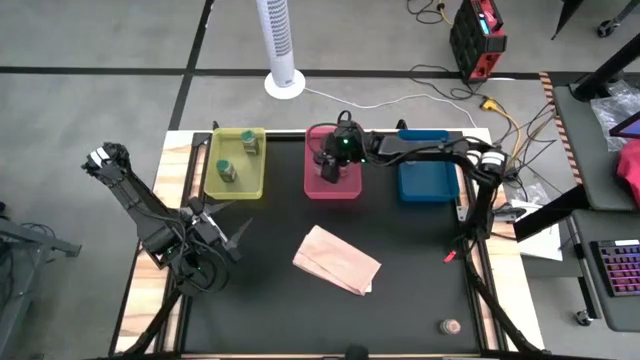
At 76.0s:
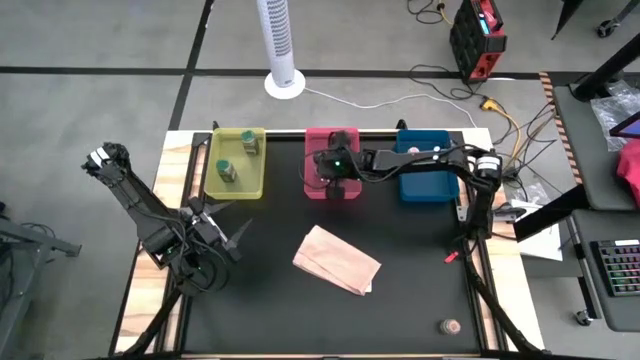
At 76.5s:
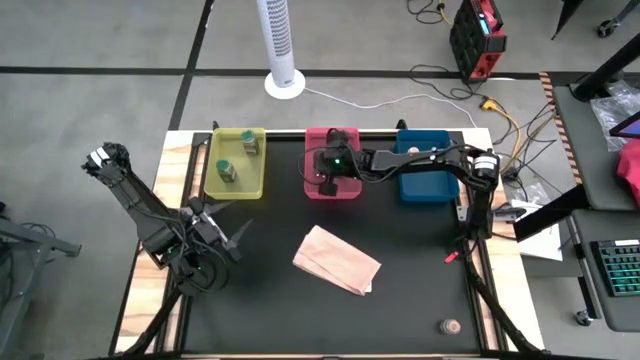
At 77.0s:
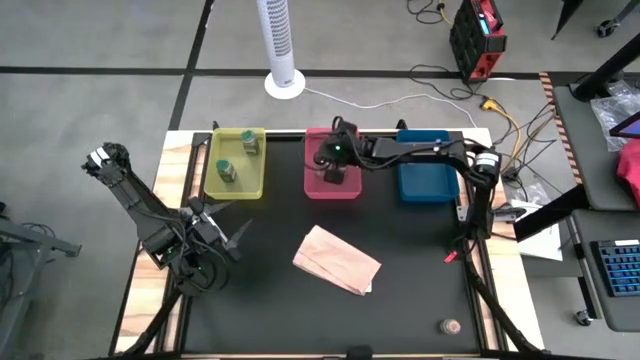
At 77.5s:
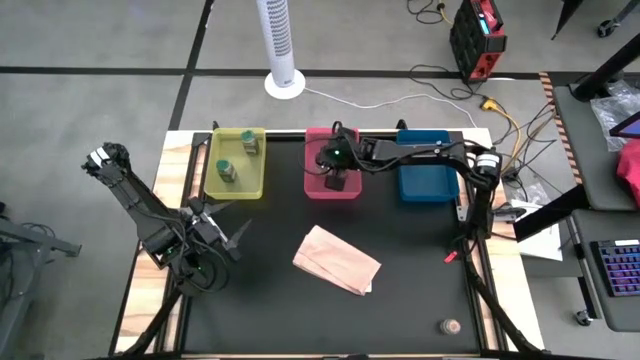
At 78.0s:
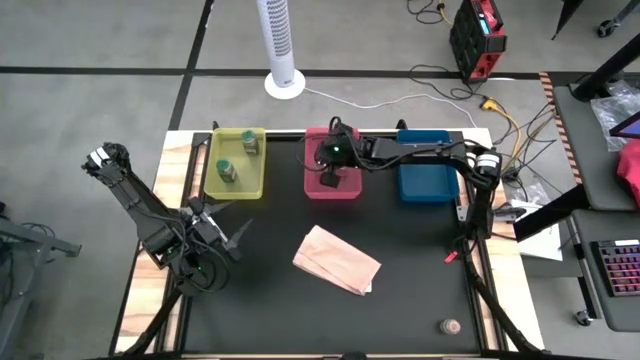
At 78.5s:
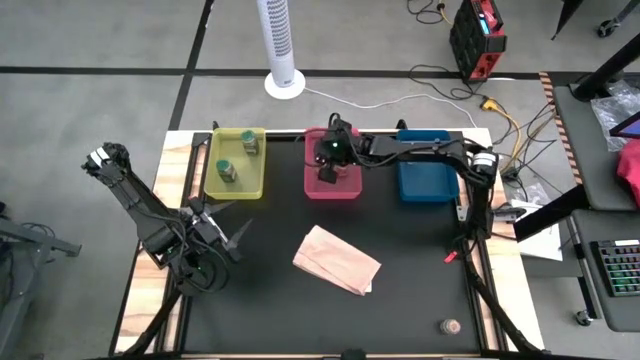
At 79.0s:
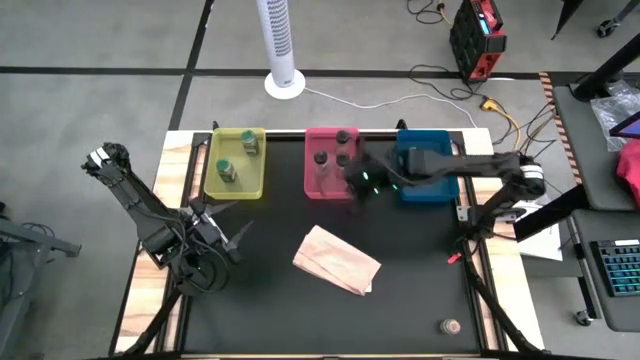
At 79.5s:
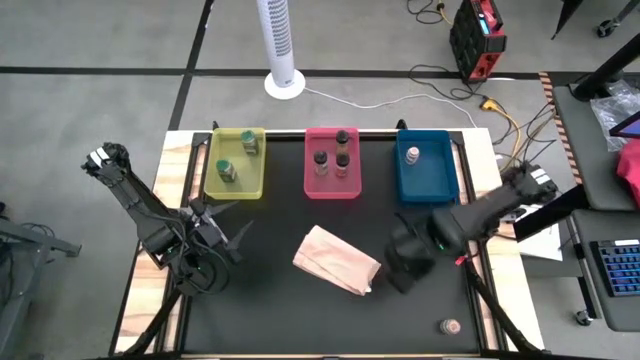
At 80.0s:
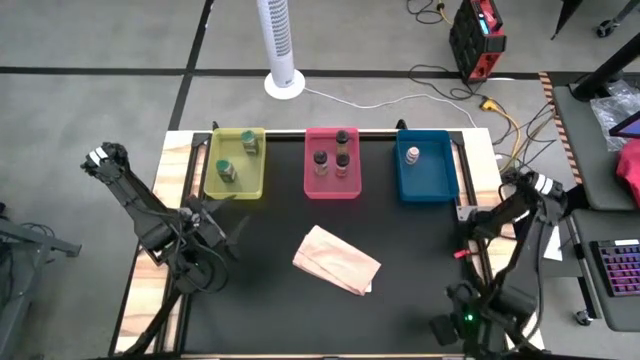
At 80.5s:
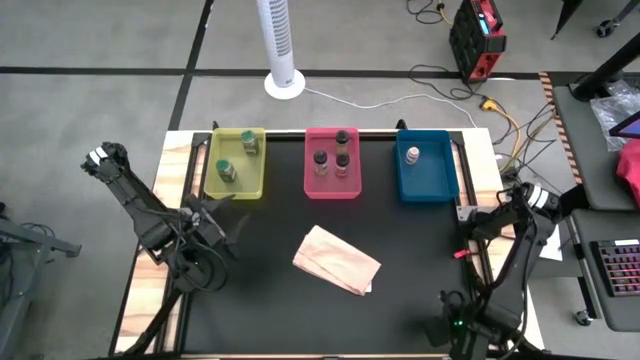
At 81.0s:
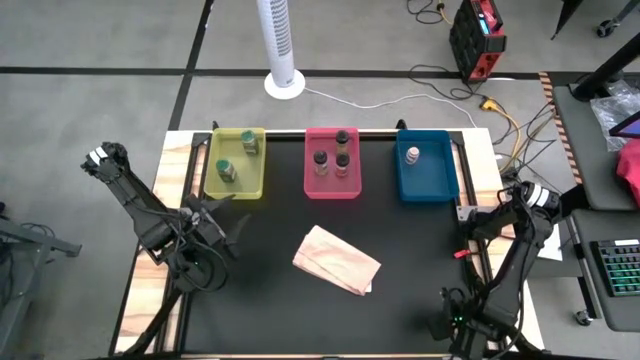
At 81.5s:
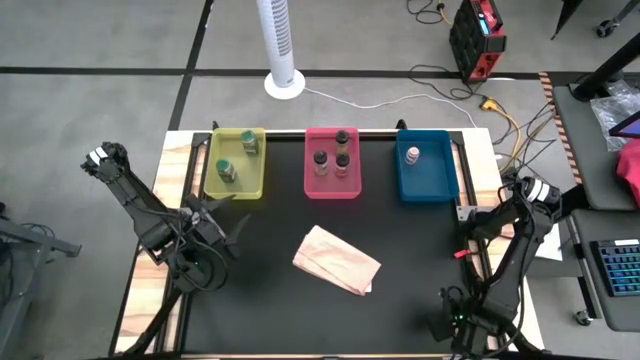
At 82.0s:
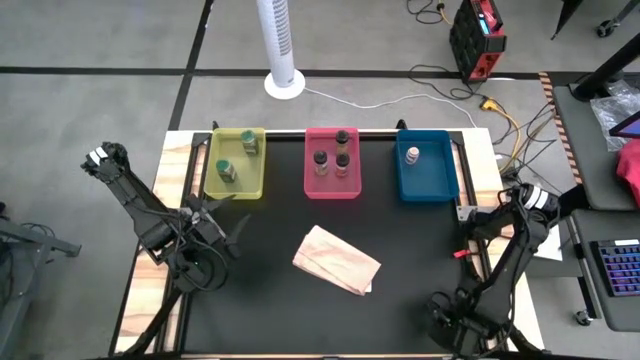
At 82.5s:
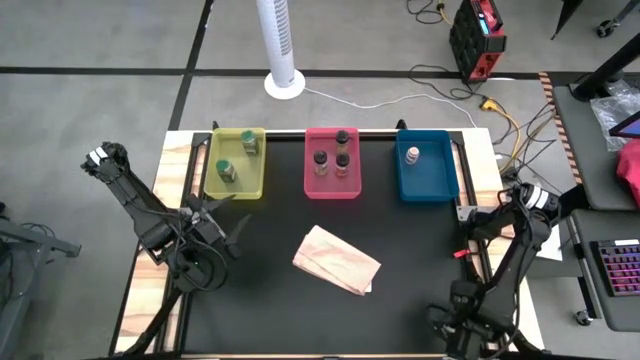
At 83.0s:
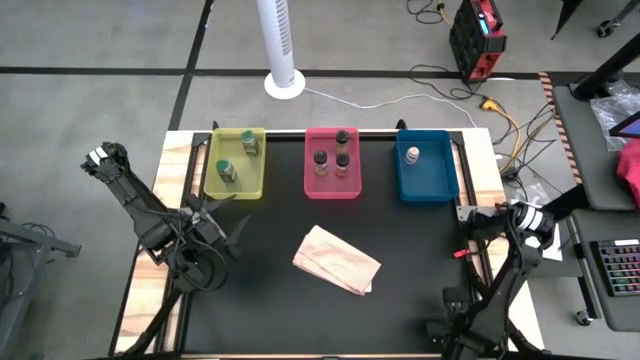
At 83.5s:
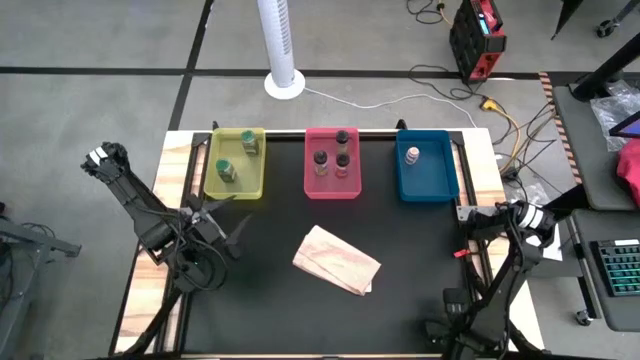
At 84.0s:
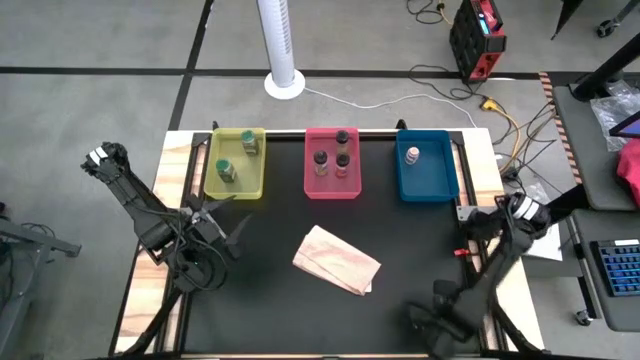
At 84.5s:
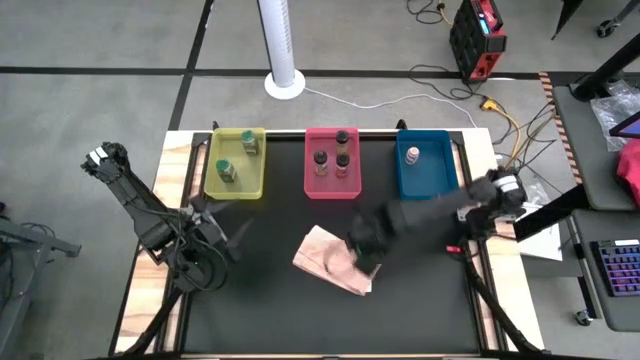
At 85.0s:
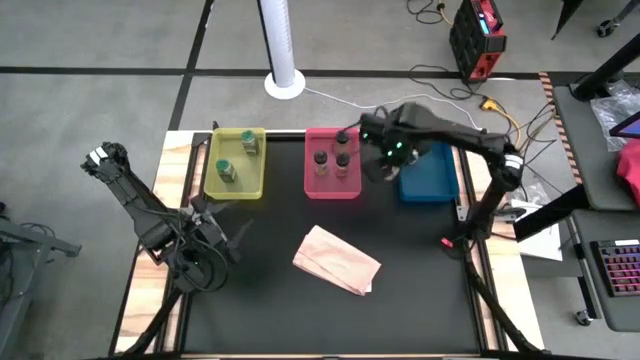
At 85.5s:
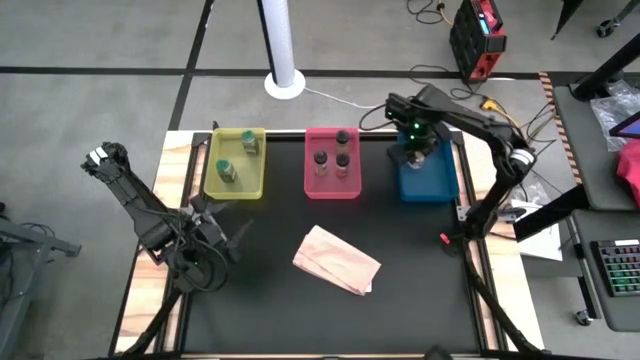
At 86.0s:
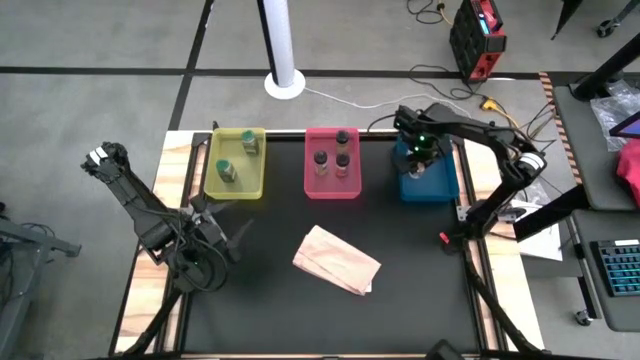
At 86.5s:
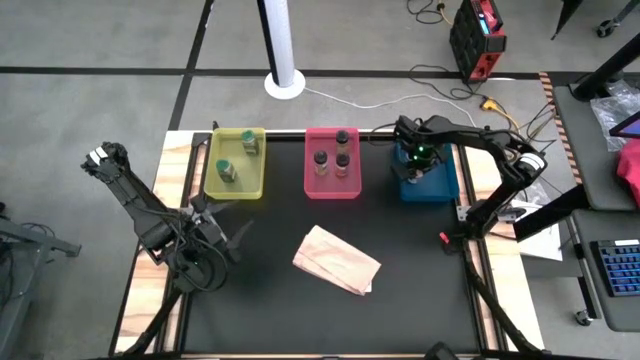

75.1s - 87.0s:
Task: Sort spices by type
Put the brown seasoning bottle into the blue bin

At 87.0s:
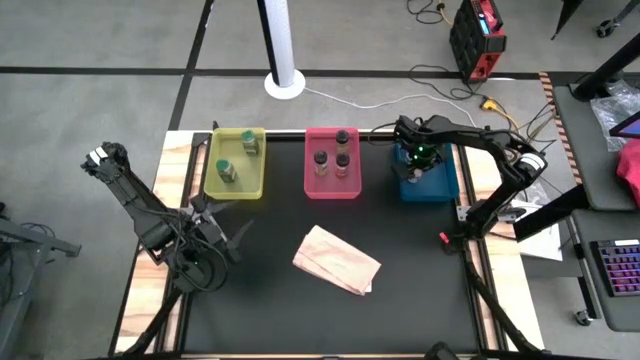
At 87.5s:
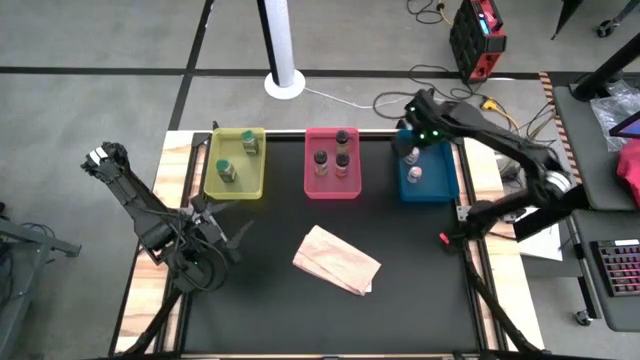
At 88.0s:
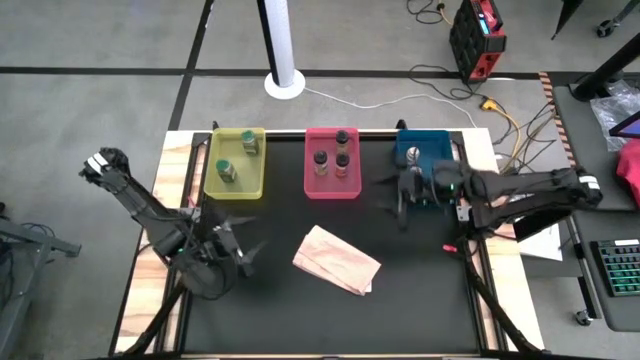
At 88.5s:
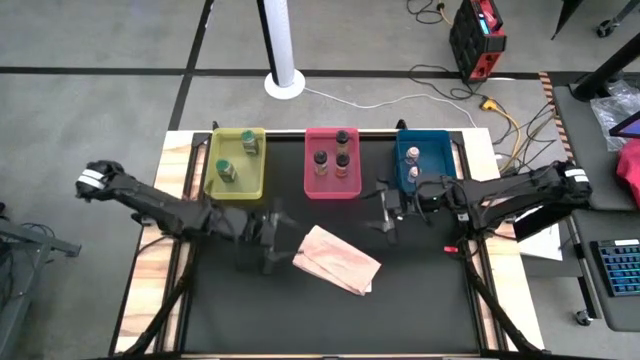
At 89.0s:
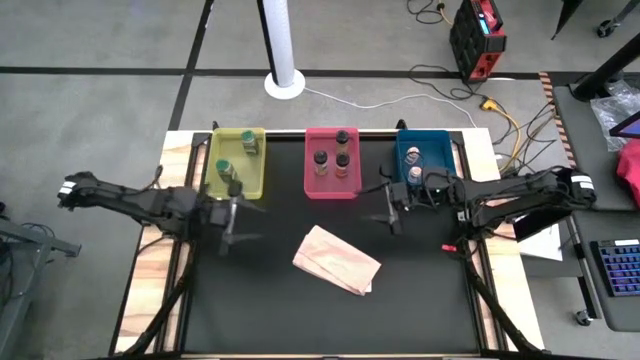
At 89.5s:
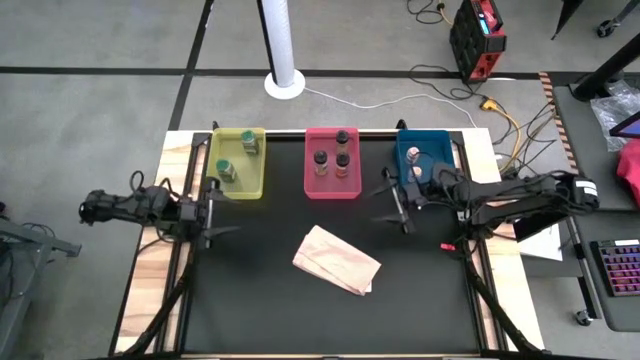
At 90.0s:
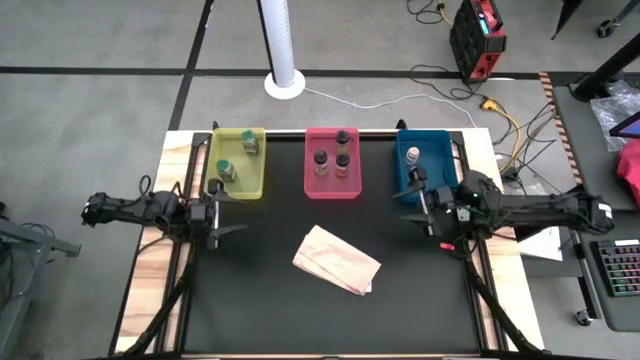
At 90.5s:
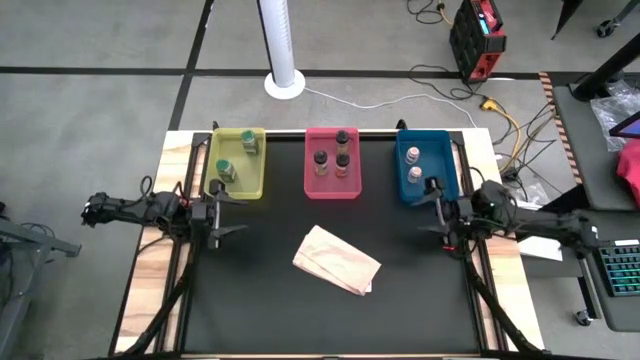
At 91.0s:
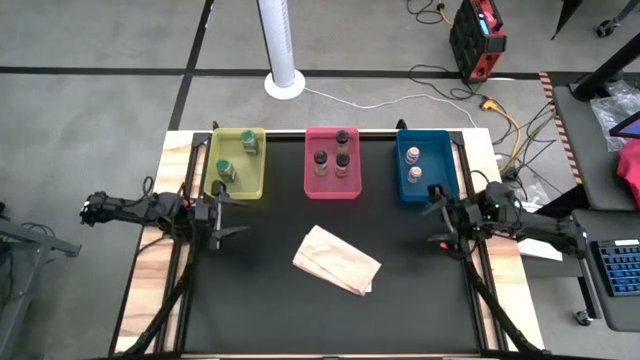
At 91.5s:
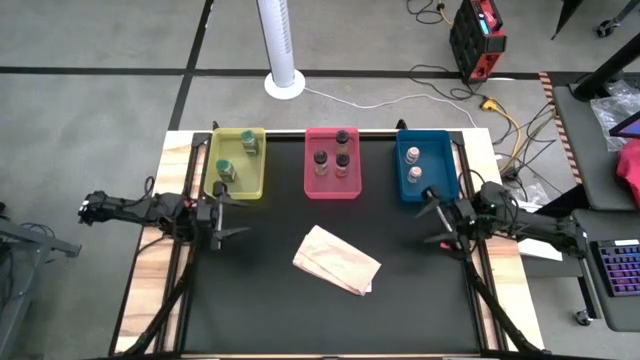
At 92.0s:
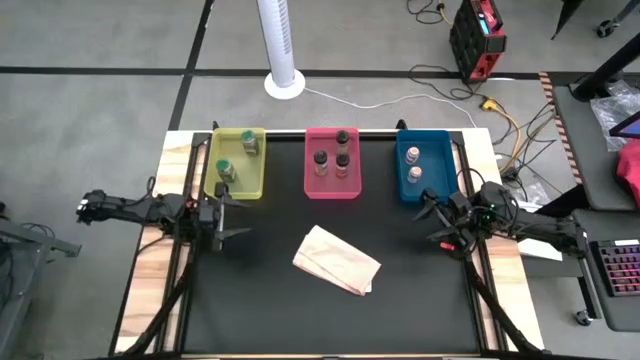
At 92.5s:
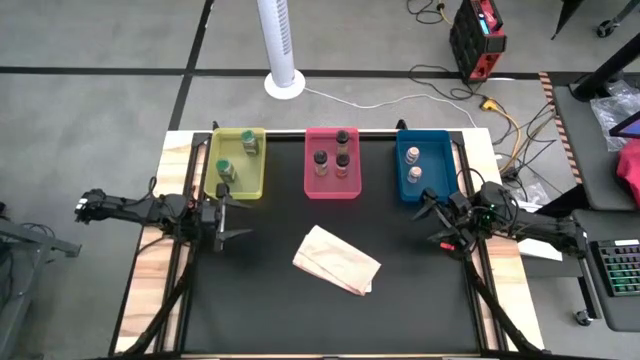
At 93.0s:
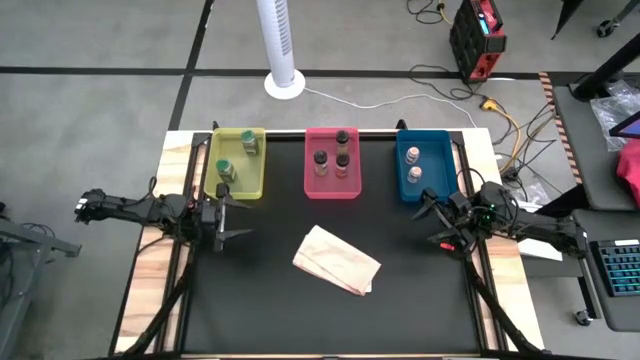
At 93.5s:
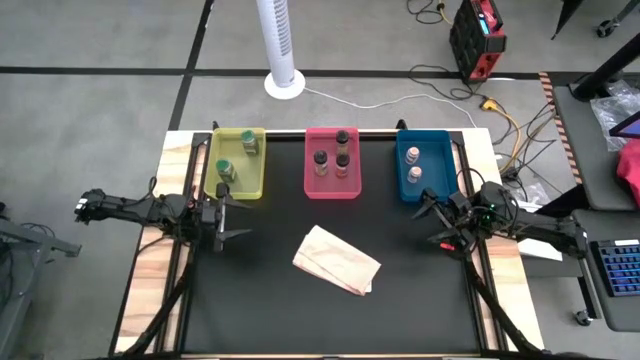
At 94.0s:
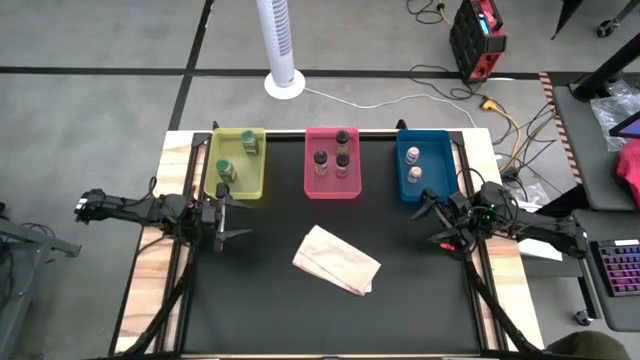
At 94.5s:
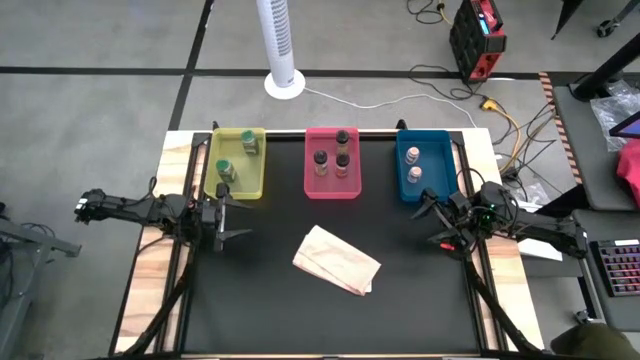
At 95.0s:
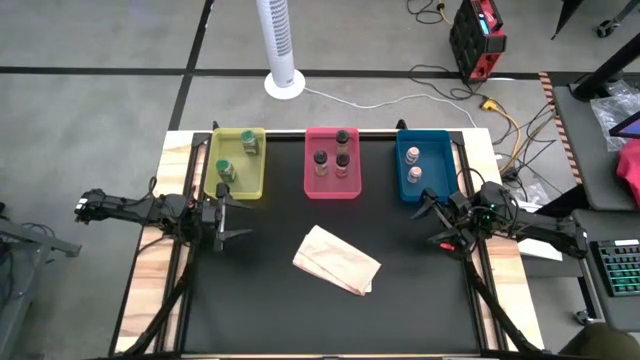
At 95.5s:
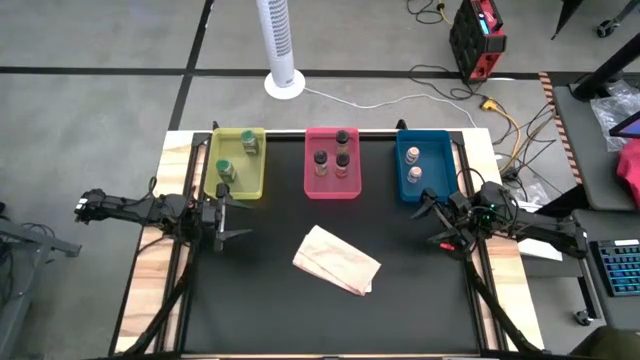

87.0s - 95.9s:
Return to Home Position
